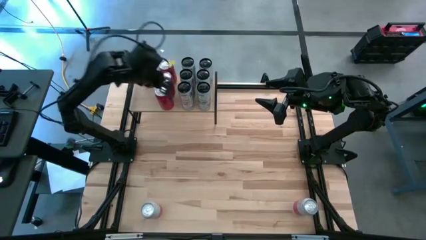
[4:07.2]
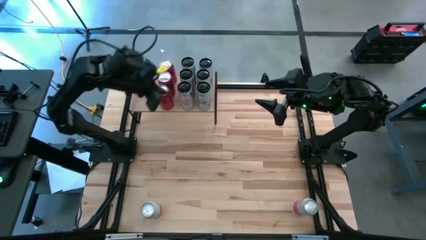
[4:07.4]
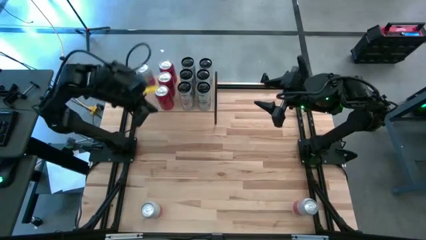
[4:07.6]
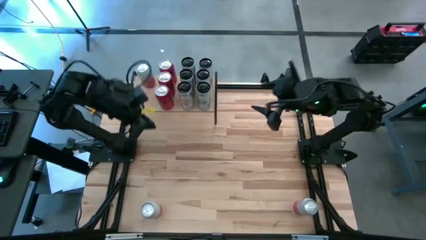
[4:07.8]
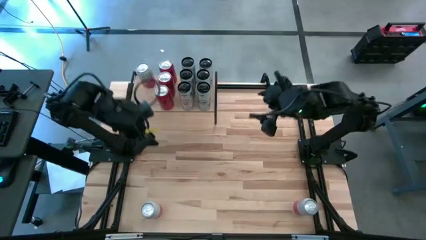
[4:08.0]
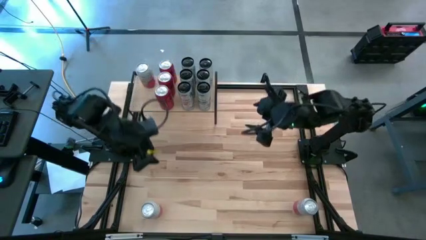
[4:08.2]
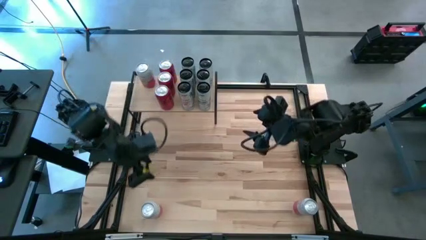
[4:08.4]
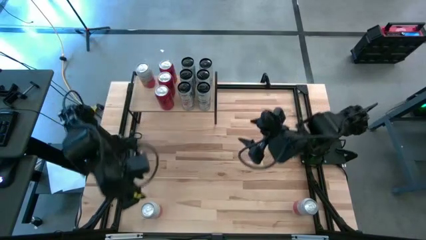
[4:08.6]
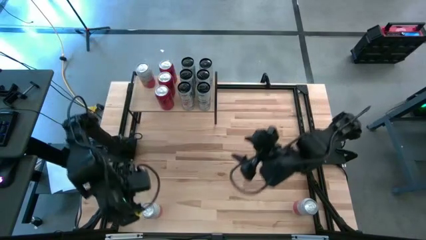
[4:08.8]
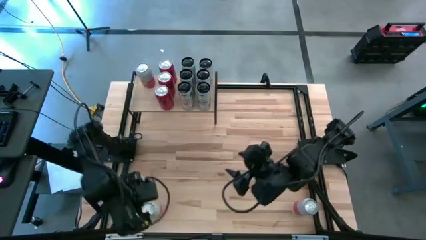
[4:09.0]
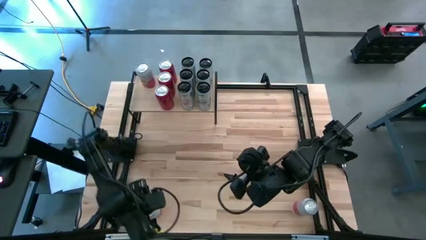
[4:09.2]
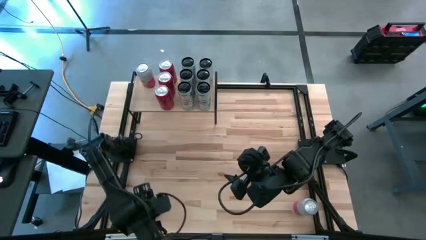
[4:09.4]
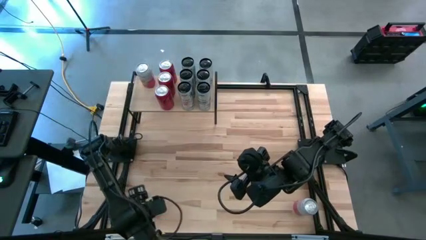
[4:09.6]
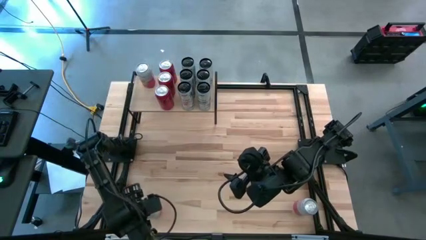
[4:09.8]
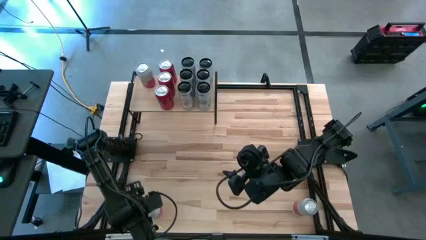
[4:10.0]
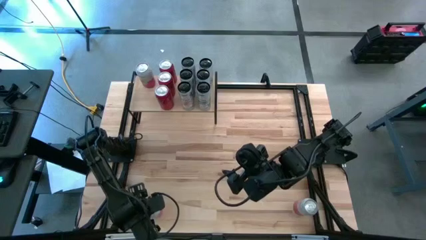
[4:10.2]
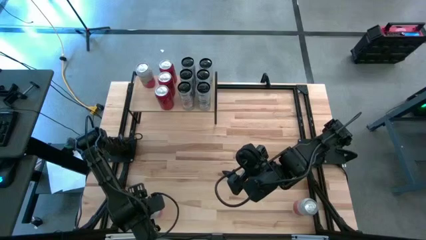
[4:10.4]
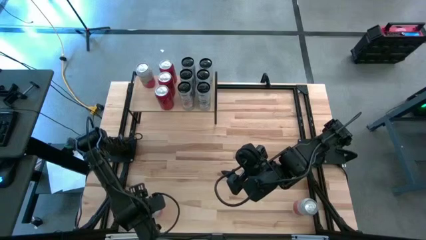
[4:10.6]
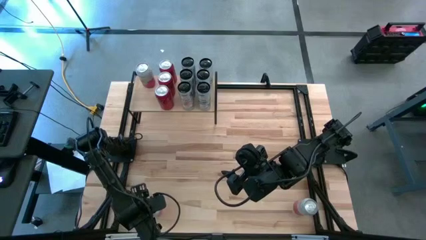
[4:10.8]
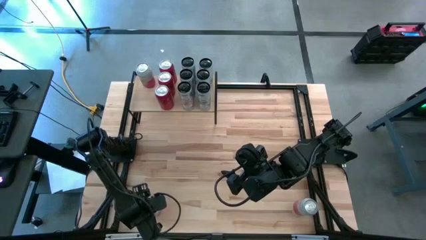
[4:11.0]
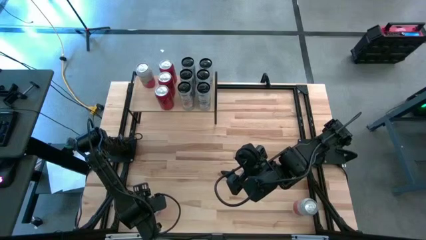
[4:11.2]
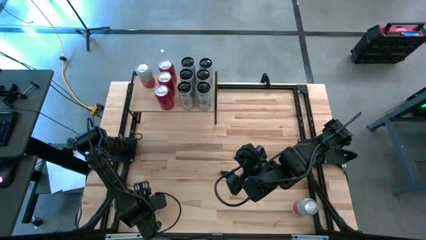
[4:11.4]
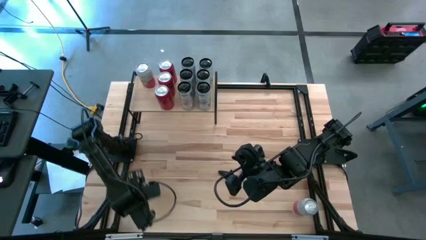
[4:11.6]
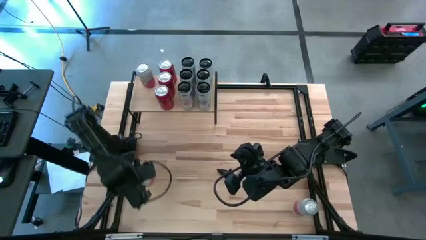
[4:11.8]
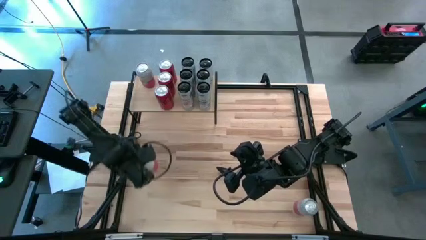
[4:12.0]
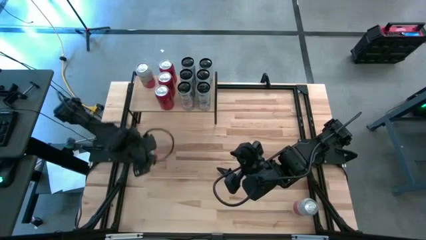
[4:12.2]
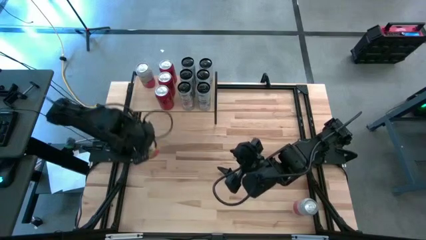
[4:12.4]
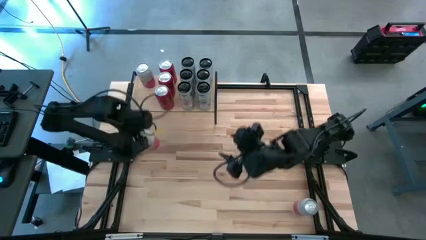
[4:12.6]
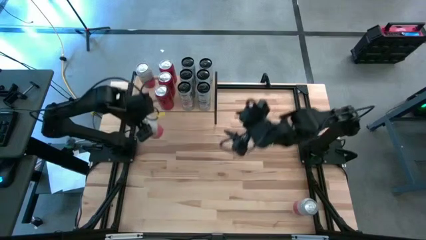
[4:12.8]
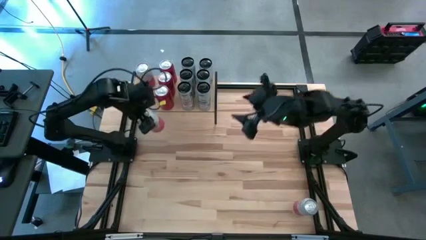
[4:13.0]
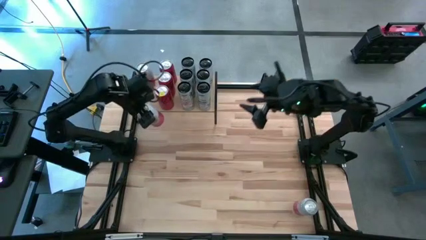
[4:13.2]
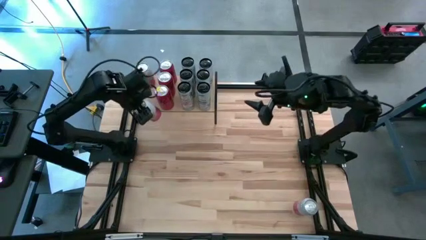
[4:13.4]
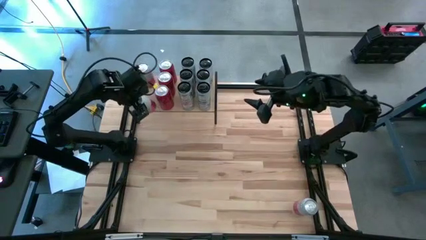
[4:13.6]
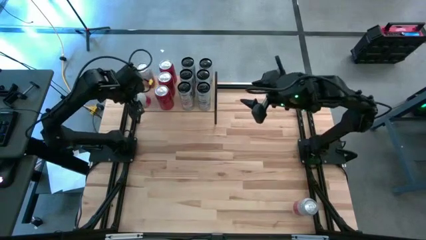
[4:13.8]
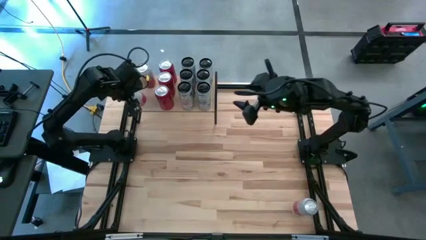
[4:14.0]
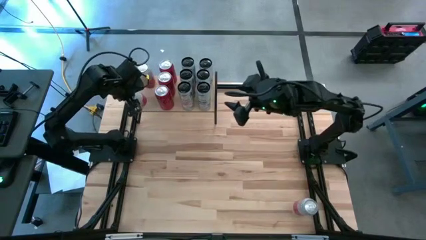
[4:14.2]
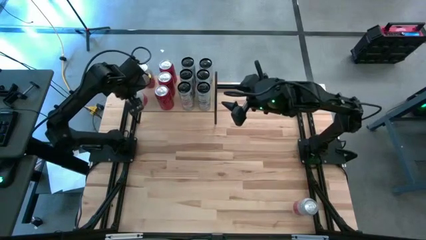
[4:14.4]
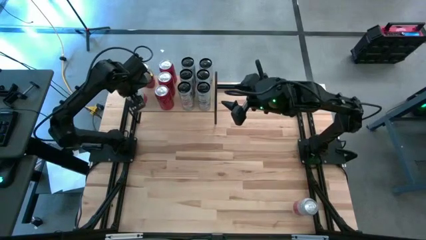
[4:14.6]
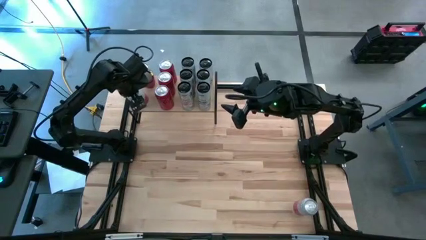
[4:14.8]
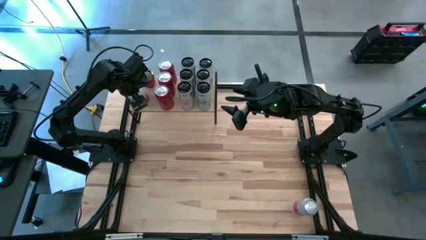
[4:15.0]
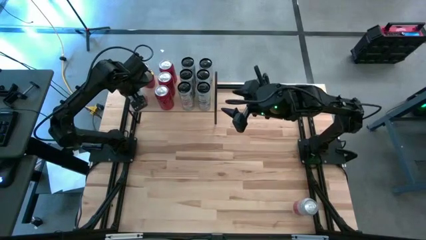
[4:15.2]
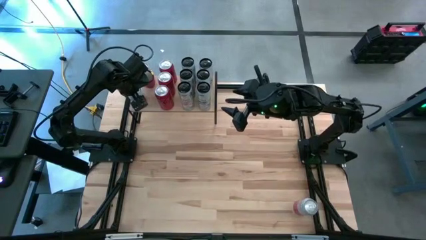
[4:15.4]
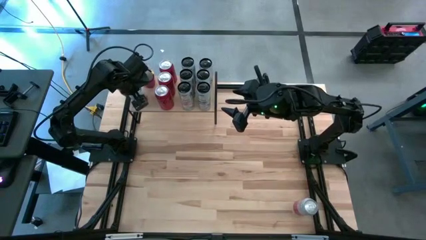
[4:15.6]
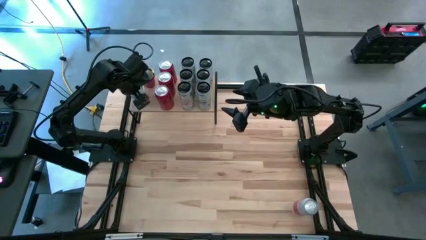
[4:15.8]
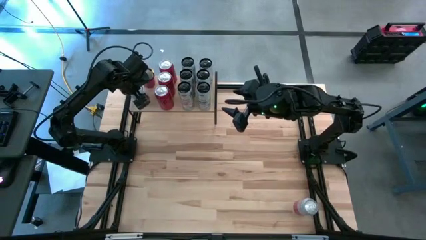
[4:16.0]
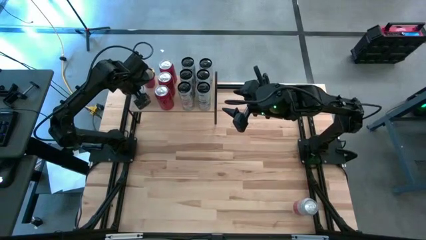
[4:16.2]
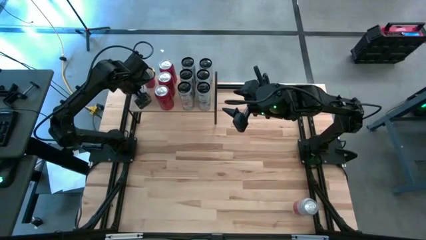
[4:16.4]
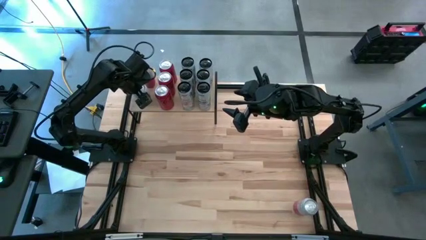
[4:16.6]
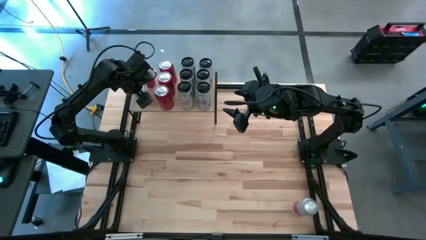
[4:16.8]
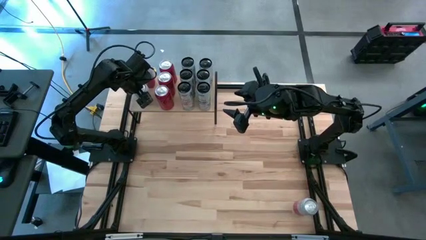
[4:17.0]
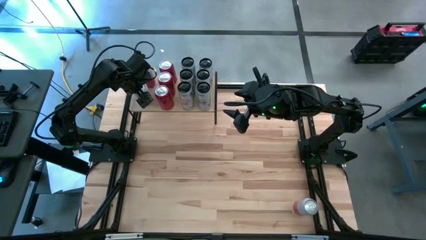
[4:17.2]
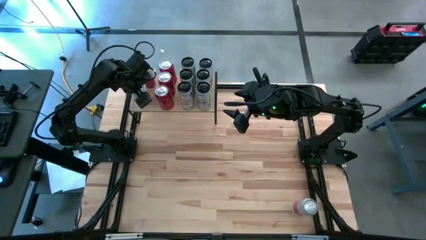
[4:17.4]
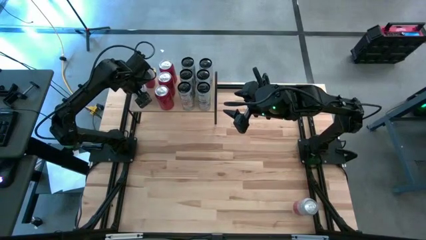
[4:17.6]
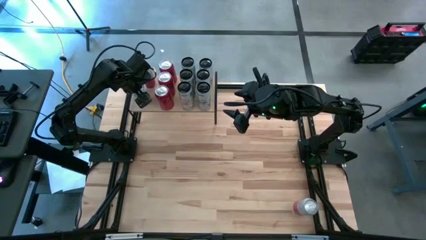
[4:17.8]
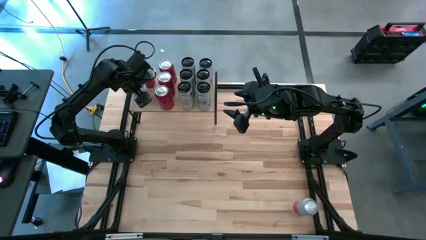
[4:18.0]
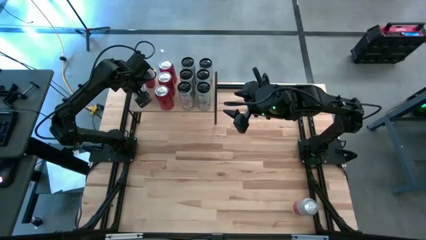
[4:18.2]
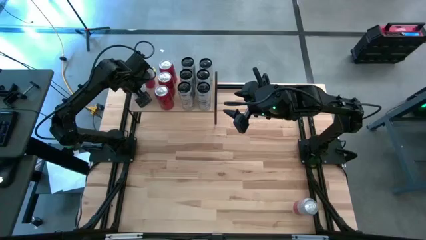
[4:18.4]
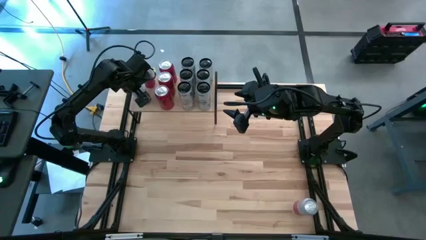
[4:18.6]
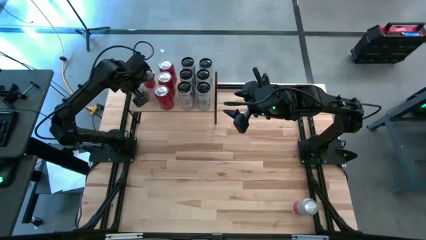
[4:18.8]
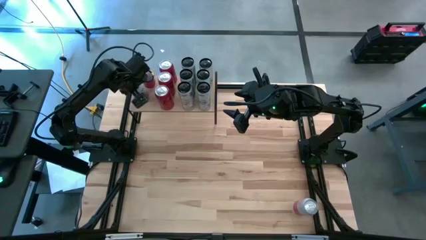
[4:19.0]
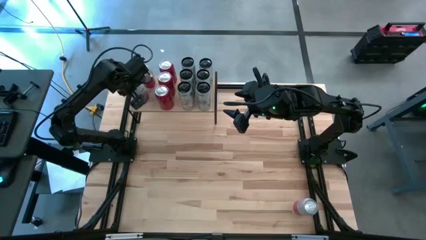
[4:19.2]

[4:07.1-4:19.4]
Task: Place canned beverage on shelf
Put the left pink soda can on the shelf aligned with the other pink soda can
